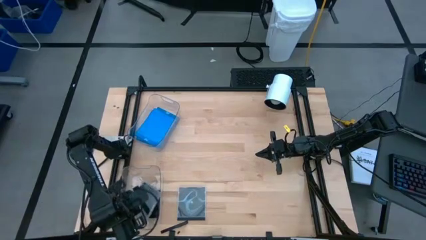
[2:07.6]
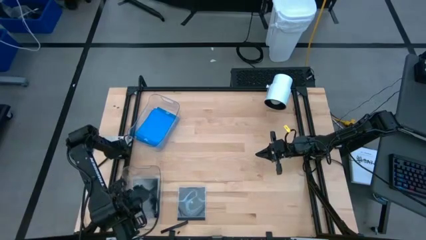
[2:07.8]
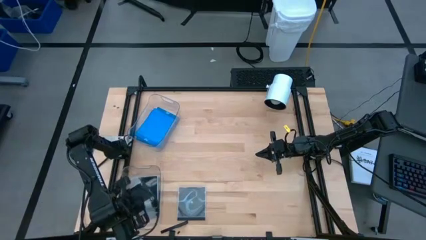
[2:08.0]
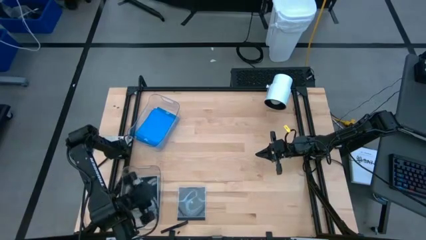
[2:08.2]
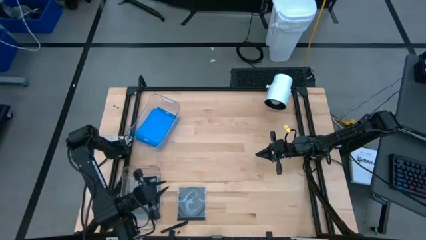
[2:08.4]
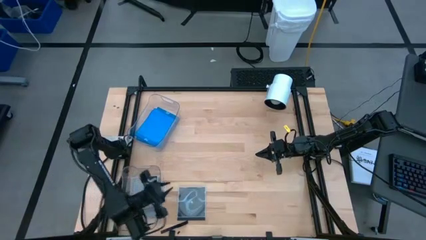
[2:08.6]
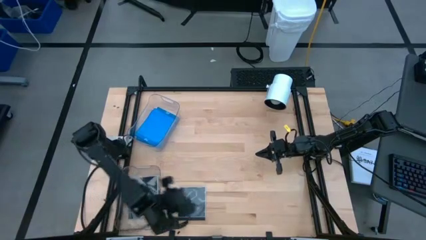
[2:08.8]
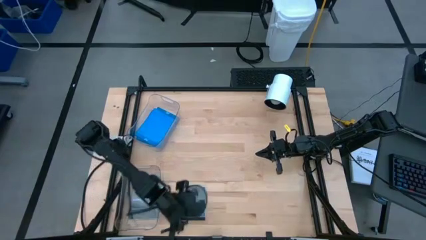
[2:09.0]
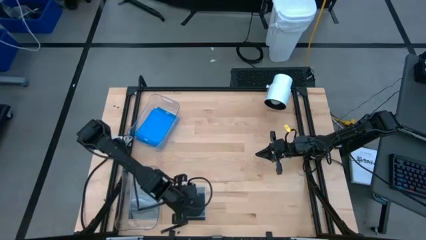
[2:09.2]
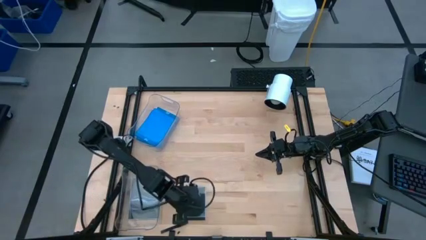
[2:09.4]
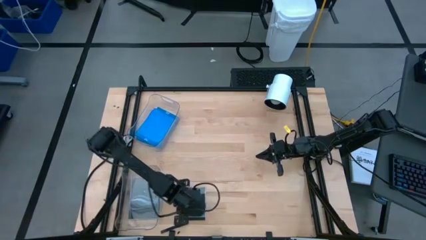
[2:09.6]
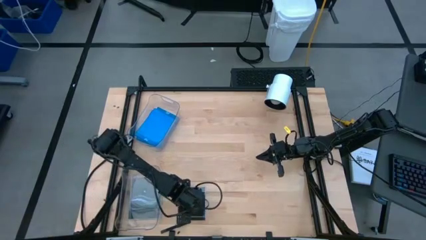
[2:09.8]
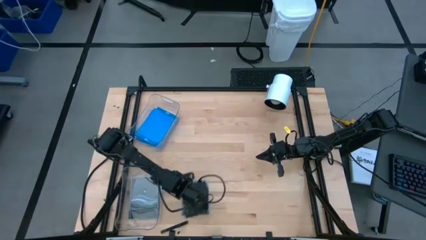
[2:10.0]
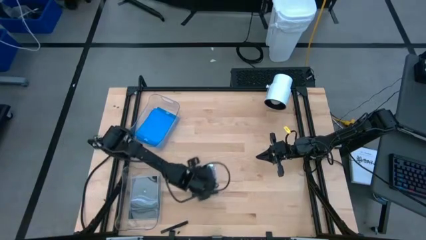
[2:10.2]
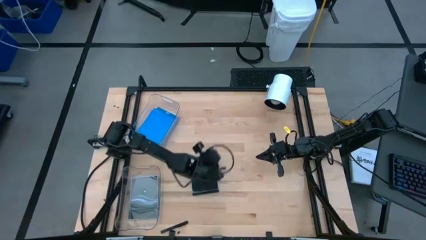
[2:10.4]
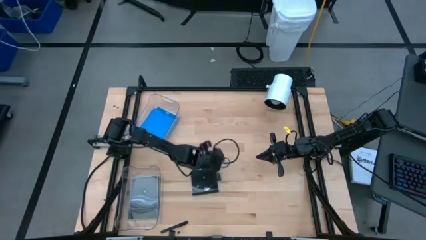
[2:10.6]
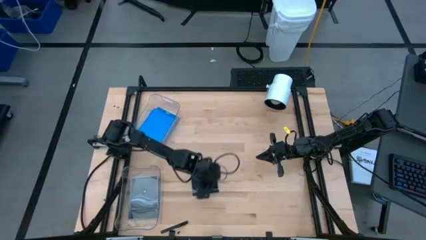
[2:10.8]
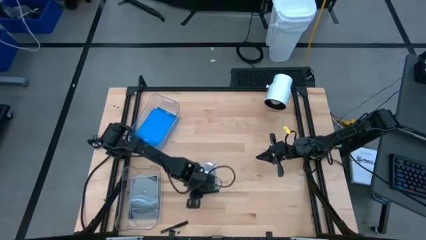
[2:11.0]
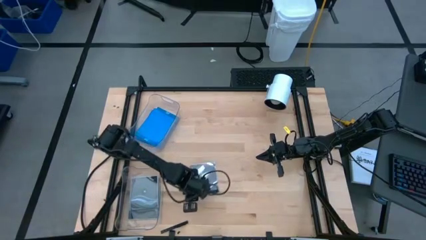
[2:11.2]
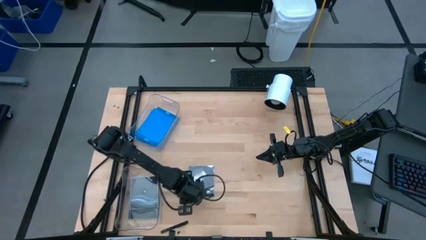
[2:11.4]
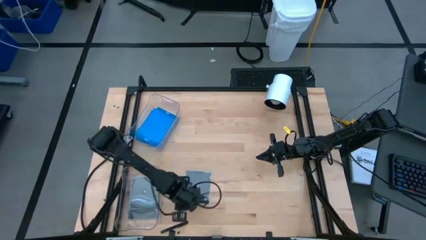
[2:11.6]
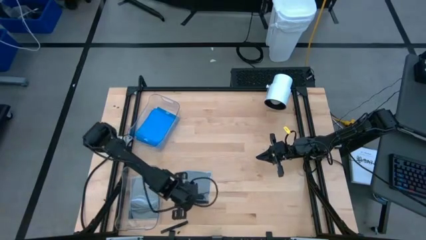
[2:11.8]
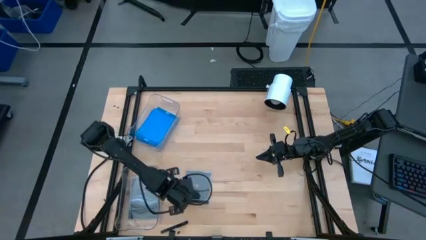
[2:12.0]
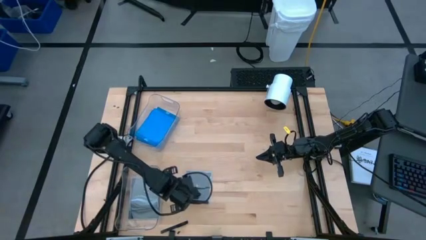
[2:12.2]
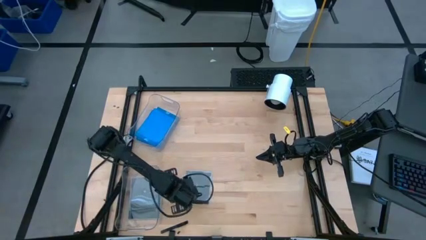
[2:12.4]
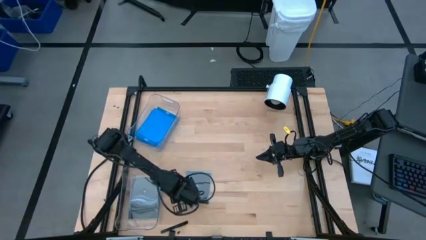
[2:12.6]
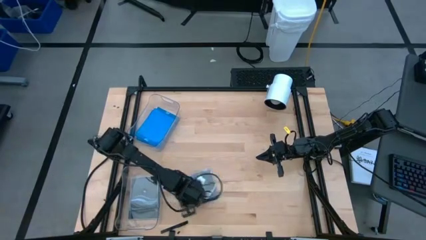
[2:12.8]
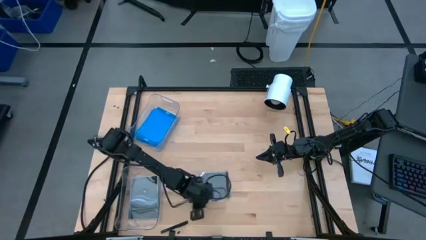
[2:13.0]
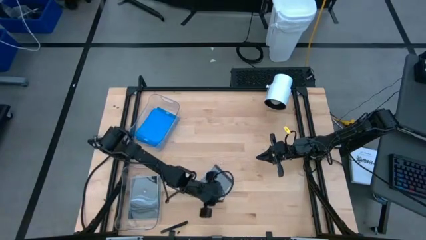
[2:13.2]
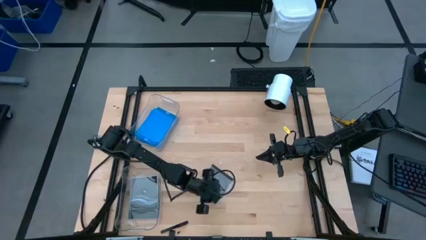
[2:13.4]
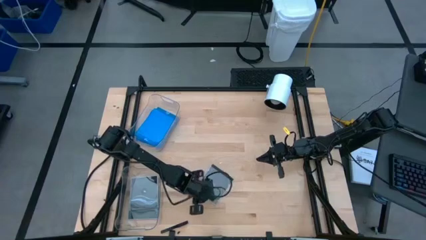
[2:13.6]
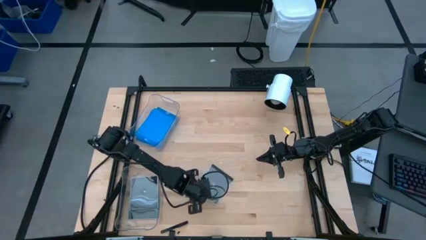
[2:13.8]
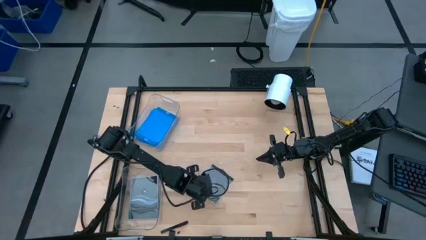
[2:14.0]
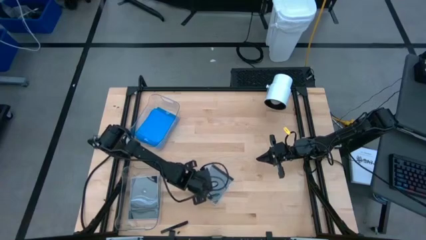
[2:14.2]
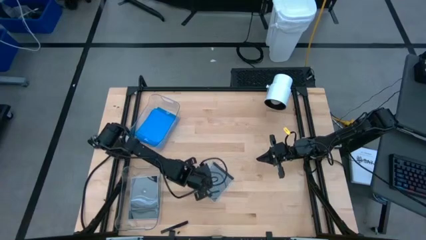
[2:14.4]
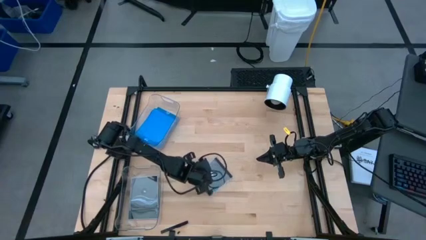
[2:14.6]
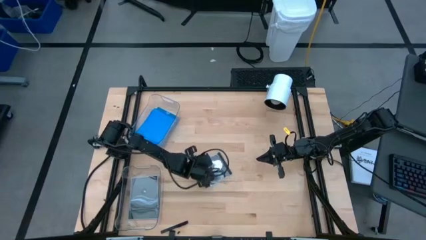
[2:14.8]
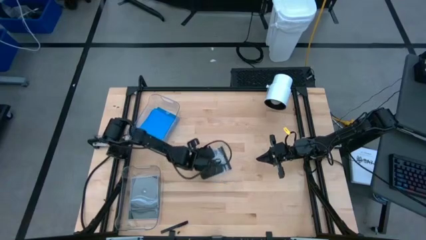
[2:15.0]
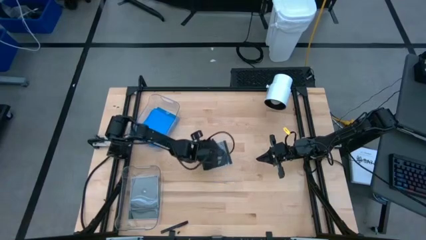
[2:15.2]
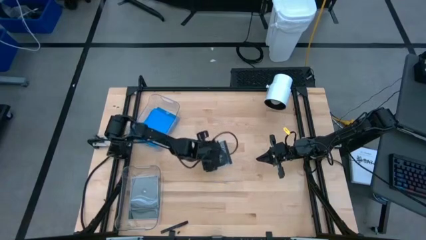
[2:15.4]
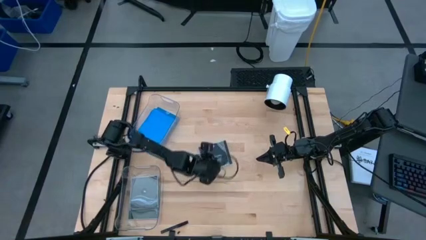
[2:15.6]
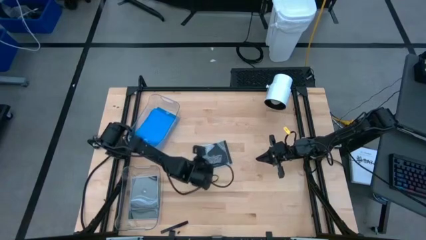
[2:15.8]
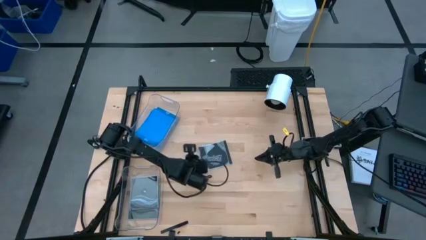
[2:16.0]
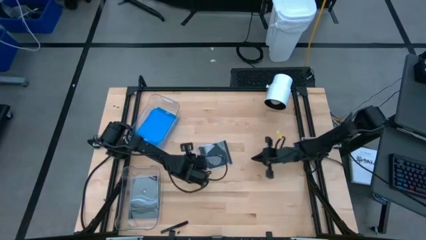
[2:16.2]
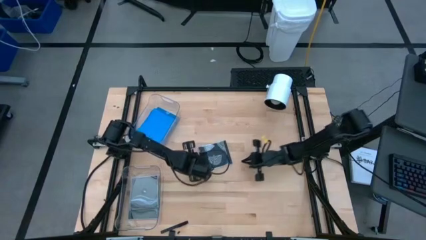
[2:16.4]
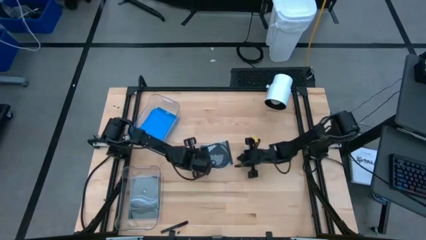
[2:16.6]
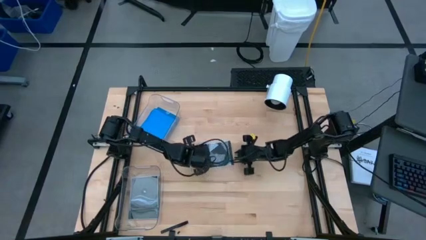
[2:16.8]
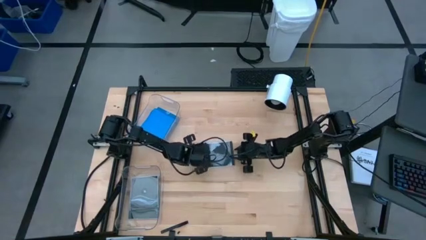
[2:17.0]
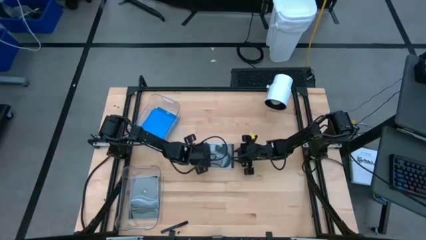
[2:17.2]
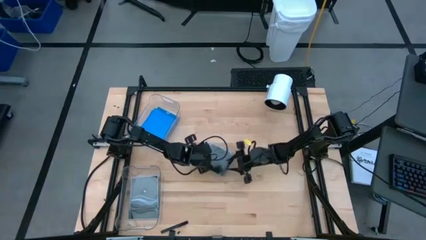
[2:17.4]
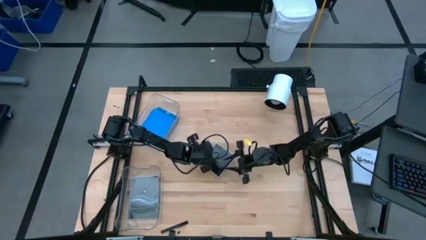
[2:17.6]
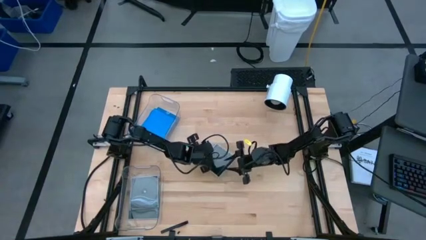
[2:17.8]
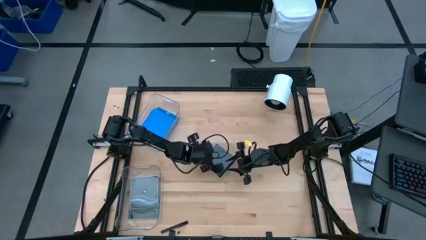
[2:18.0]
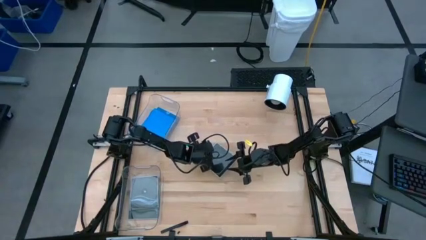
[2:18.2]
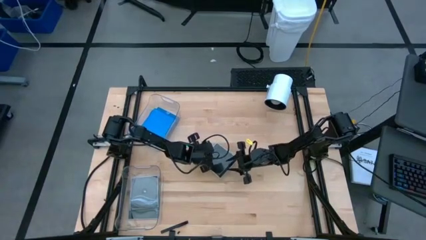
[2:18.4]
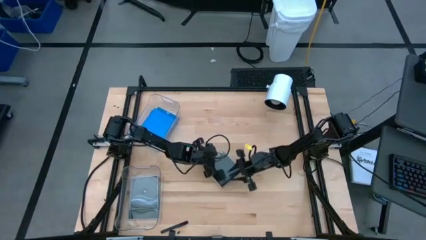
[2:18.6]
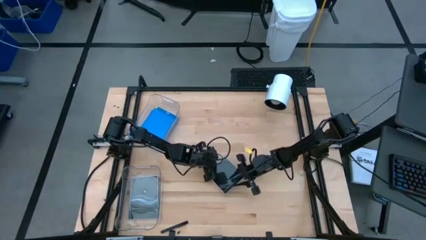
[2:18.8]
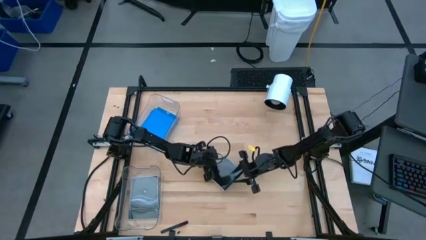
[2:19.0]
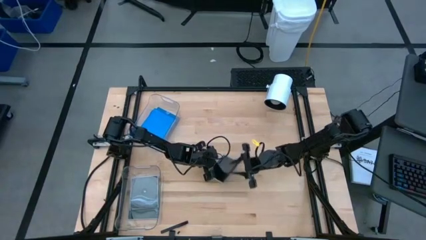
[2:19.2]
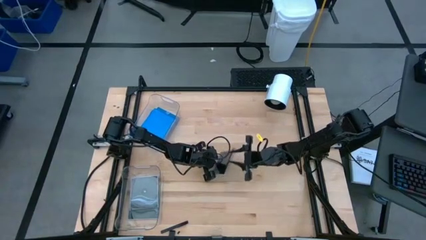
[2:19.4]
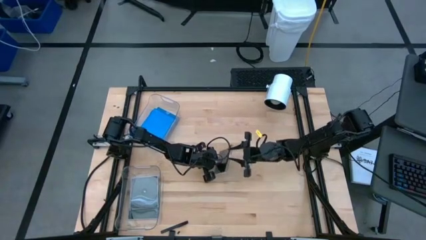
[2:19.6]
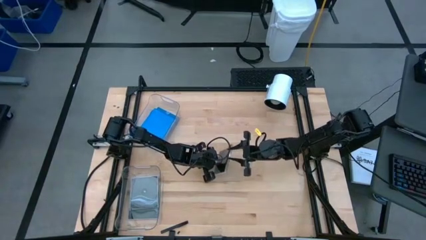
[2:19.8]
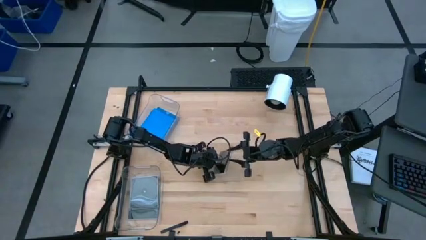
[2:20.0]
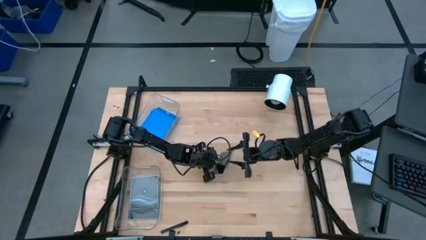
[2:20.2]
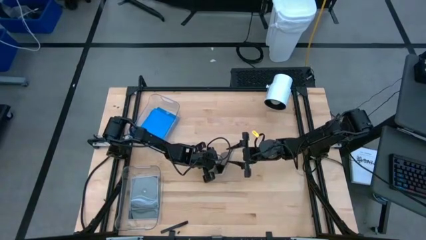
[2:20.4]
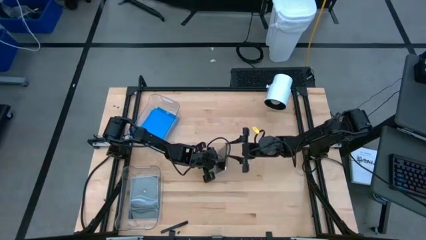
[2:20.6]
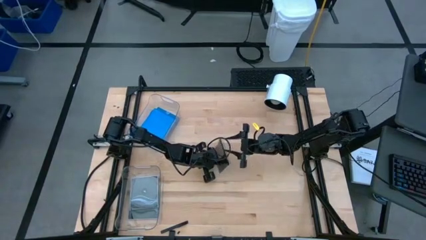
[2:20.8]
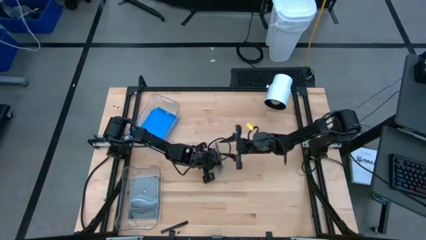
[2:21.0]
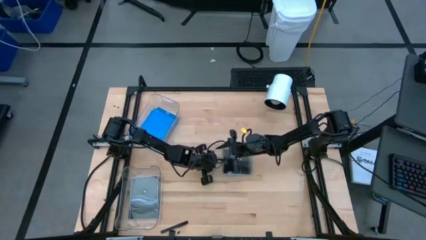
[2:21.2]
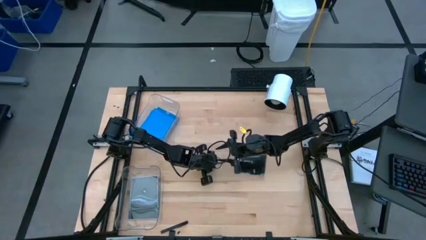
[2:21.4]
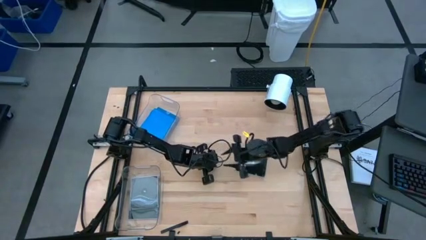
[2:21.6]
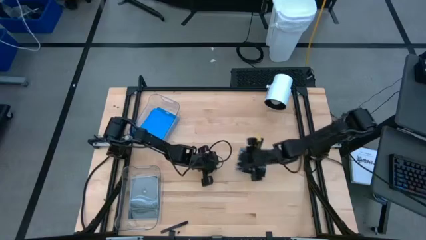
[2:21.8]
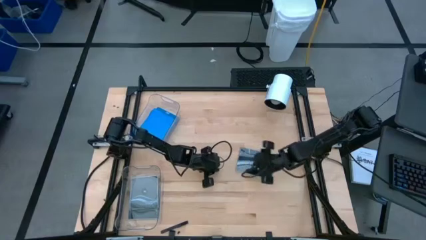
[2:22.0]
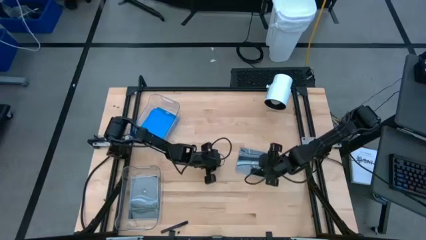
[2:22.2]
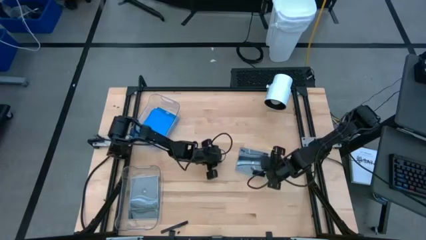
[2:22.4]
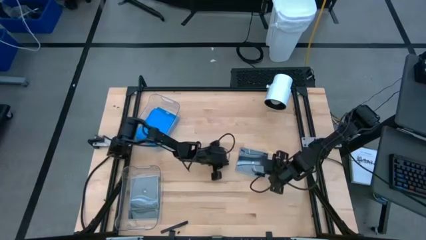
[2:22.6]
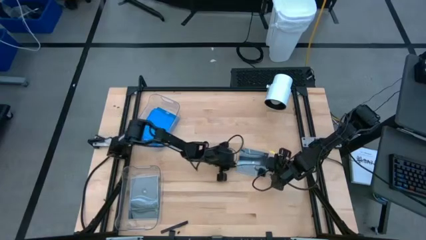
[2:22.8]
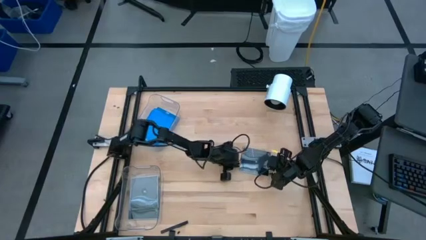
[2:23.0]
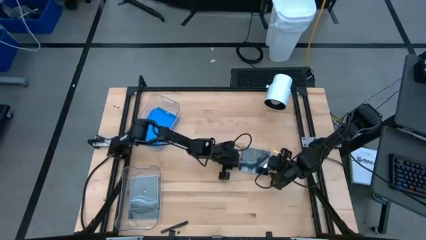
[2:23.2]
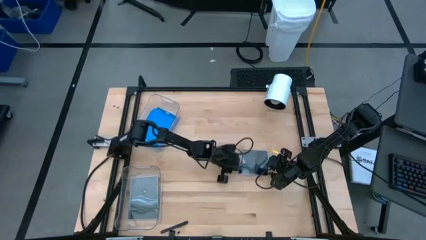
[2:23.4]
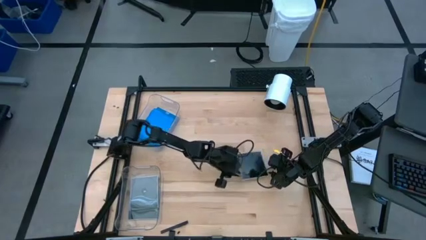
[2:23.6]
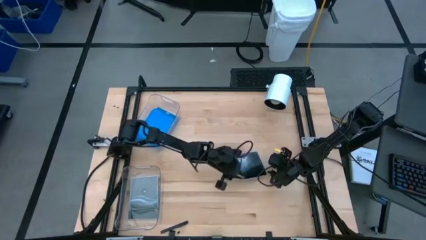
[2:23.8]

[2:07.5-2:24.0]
Task: Pick & place jewel cases by type
Put the black CD case into the bottom transparent bin
